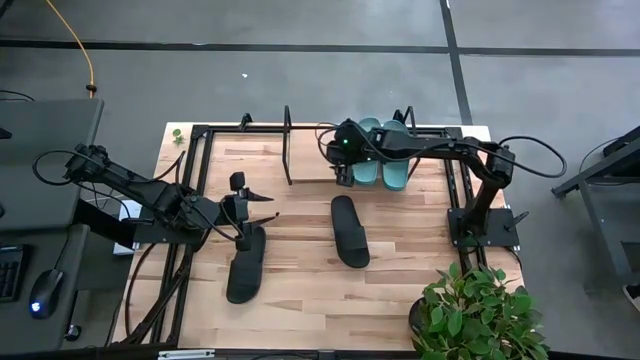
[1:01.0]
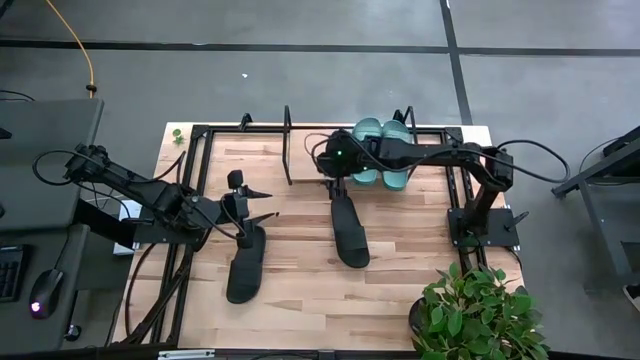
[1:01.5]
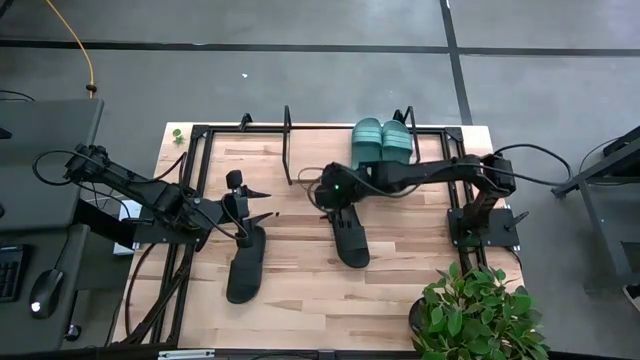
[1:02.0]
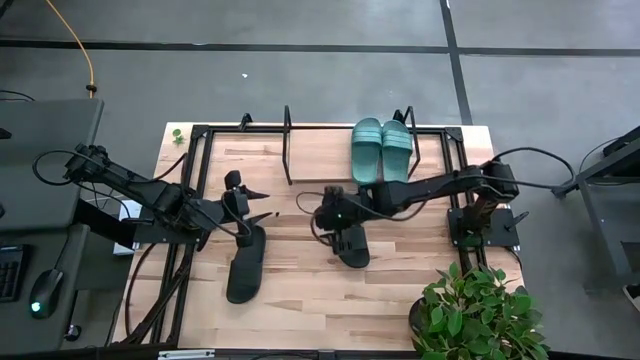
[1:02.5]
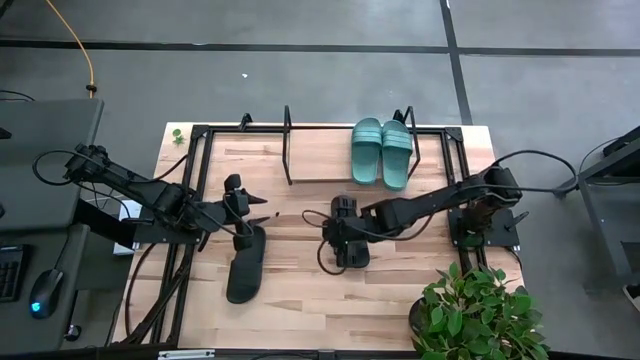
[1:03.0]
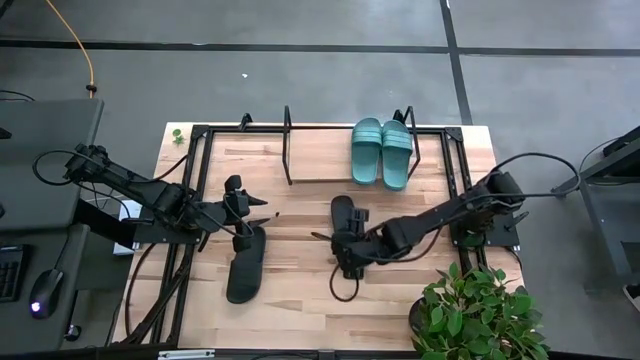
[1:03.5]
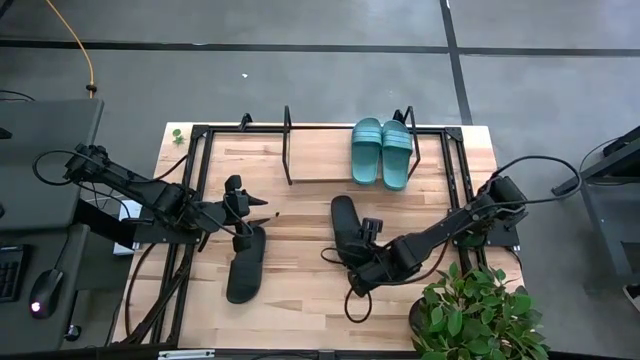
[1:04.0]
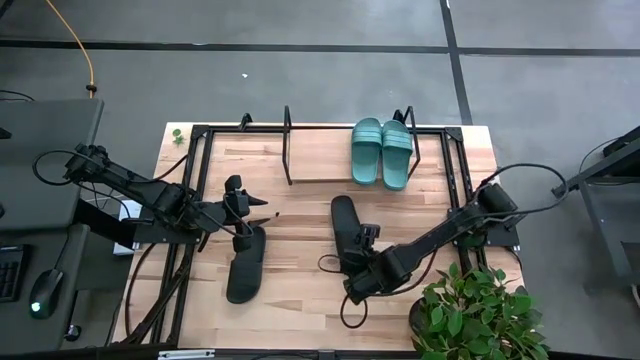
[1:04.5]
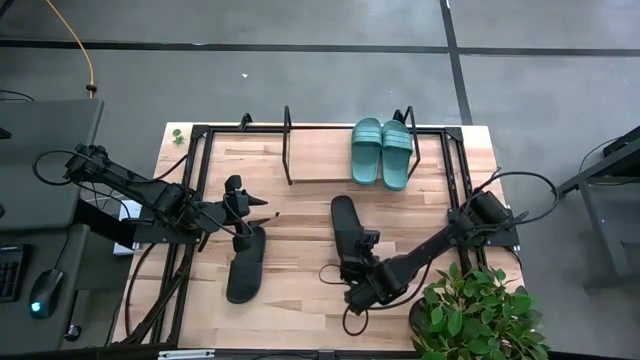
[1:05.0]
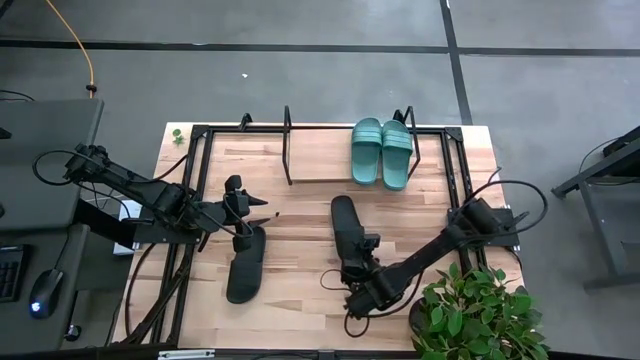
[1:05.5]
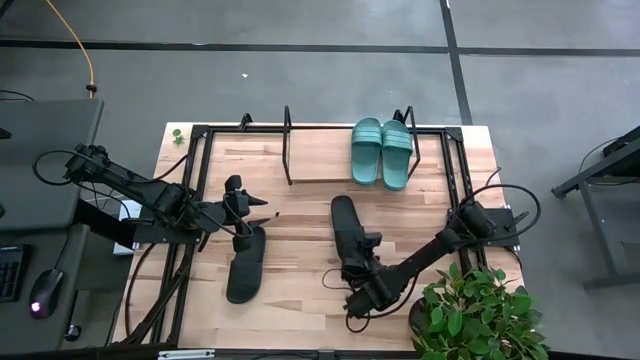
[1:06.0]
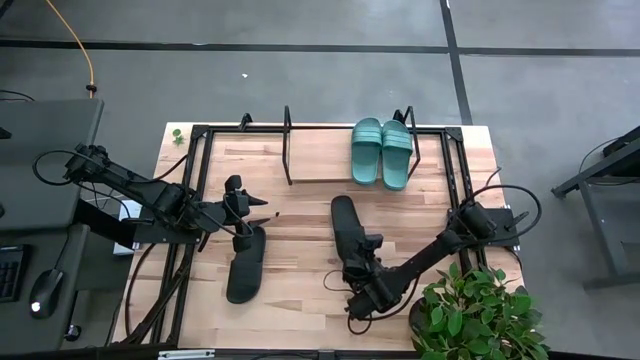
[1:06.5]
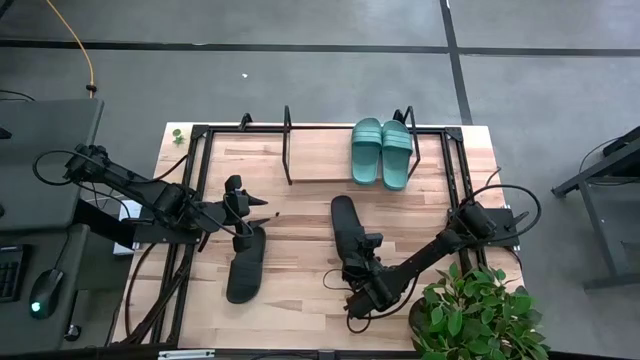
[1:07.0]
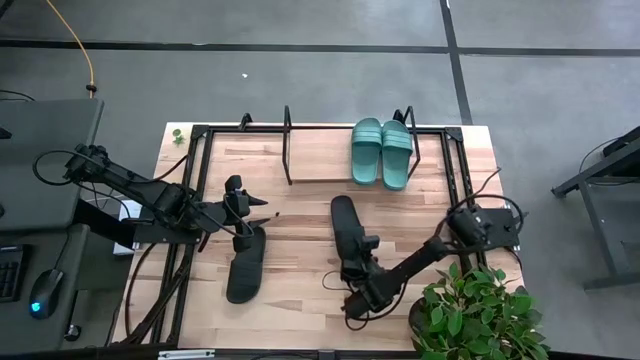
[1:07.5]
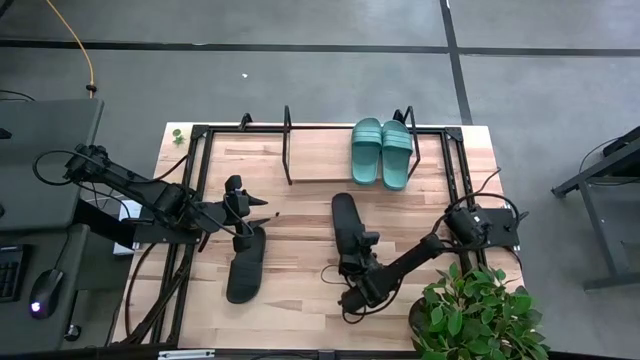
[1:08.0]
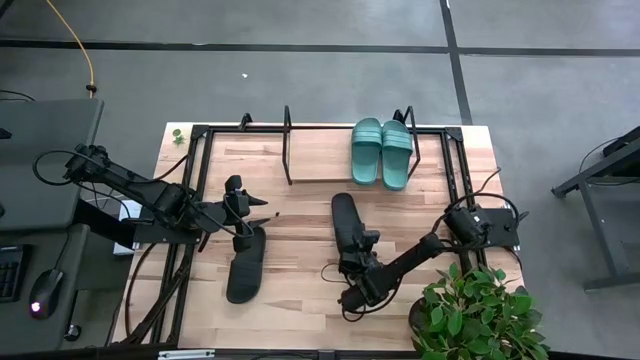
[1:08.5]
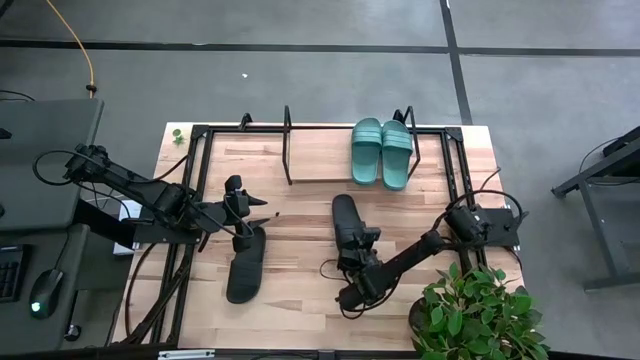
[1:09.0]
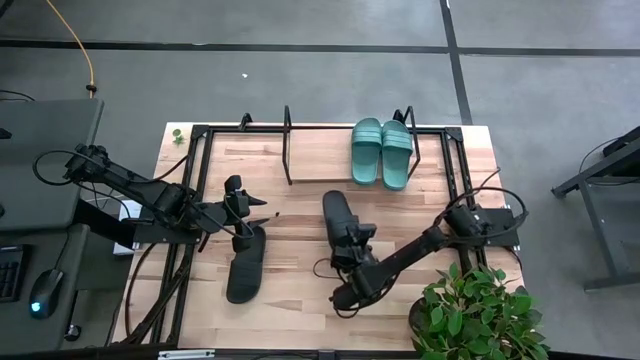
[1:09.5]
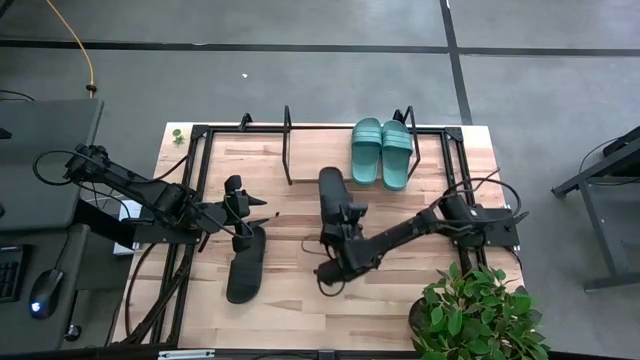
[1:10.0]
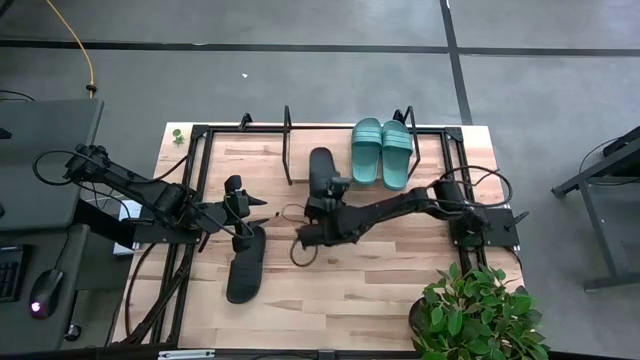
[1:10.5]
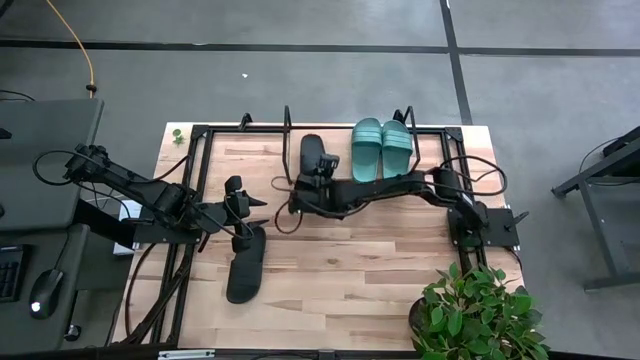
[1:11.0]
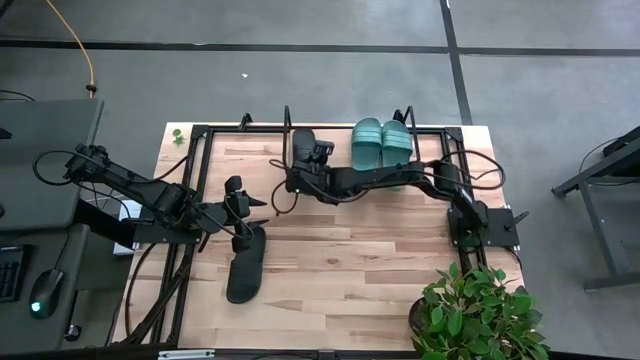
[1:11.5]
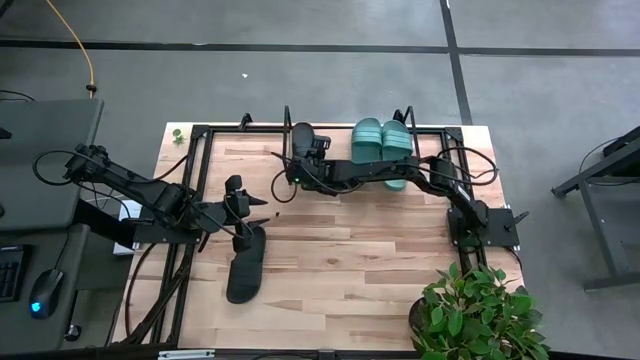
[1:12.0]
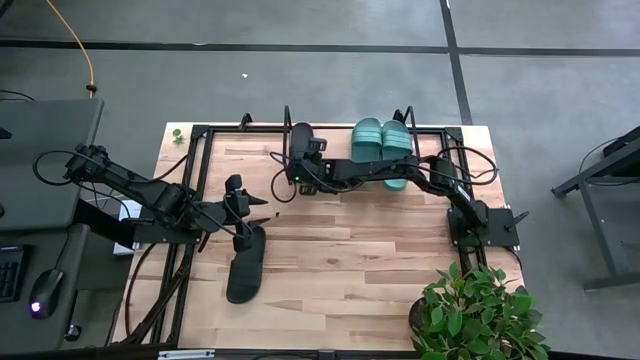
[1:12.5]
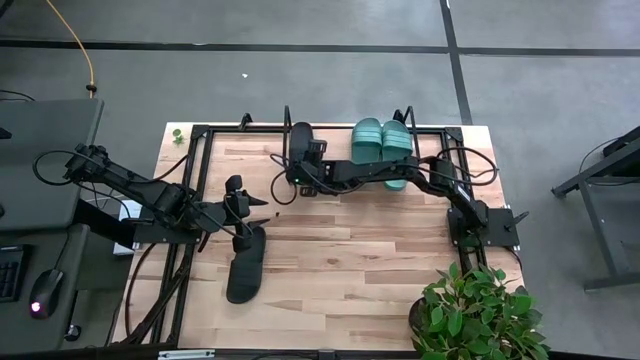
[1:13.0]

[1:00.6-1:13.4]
Task: Pick and place slides into the shelf
Put the right black slide on the shelf

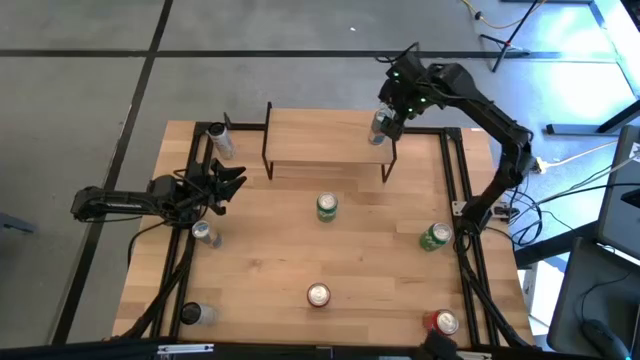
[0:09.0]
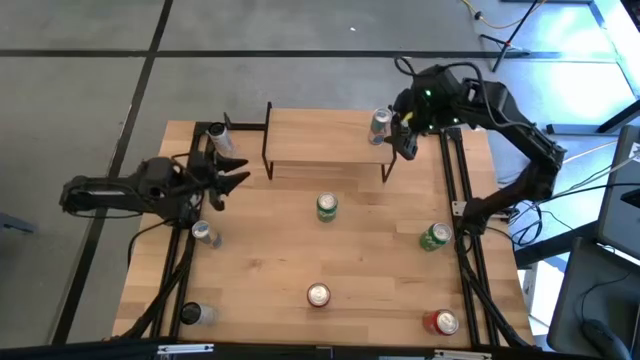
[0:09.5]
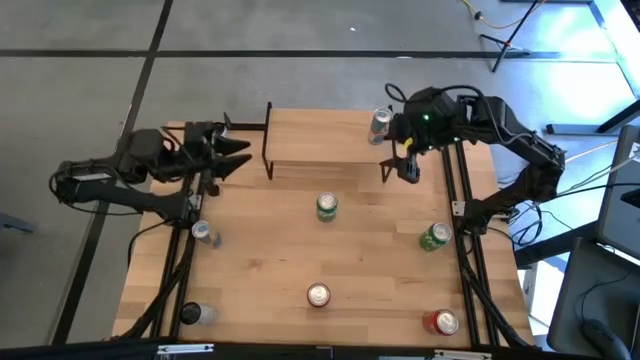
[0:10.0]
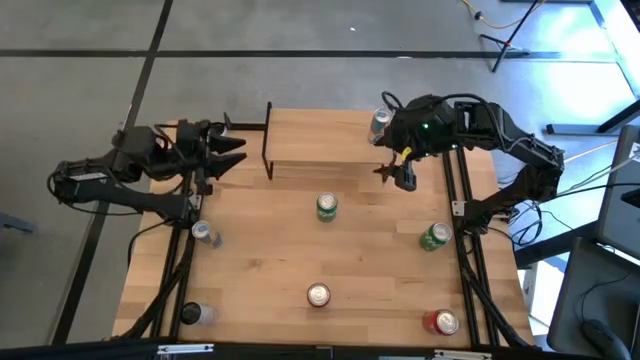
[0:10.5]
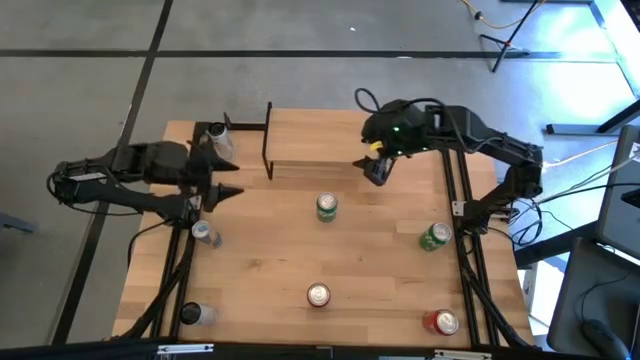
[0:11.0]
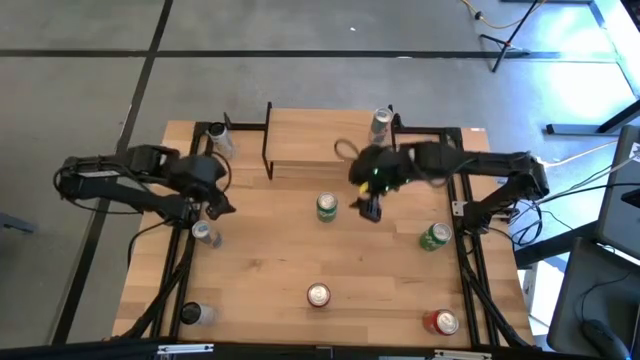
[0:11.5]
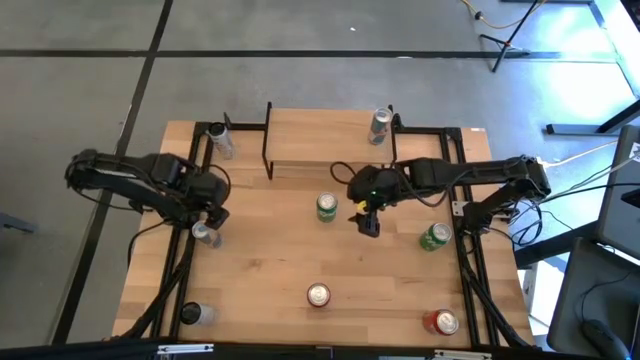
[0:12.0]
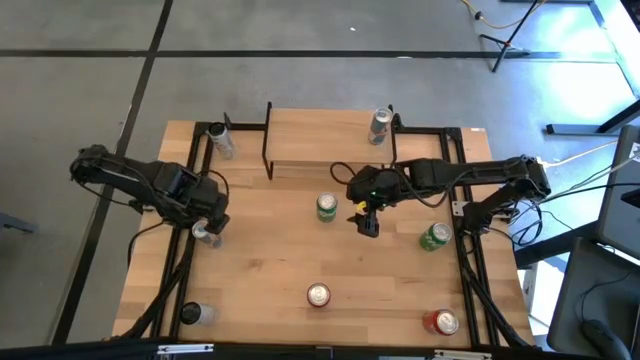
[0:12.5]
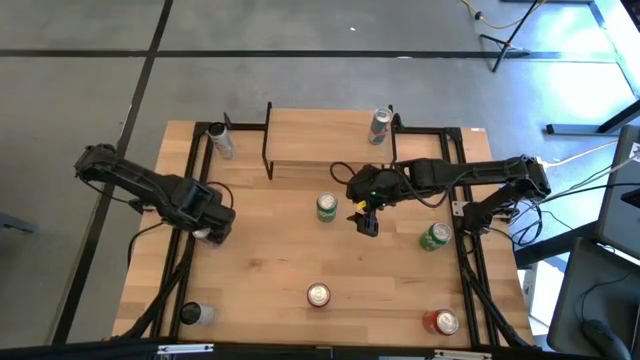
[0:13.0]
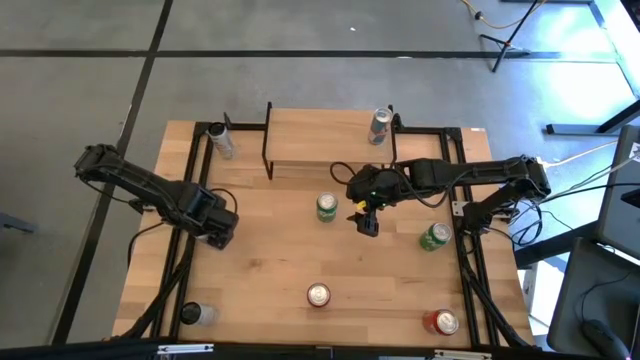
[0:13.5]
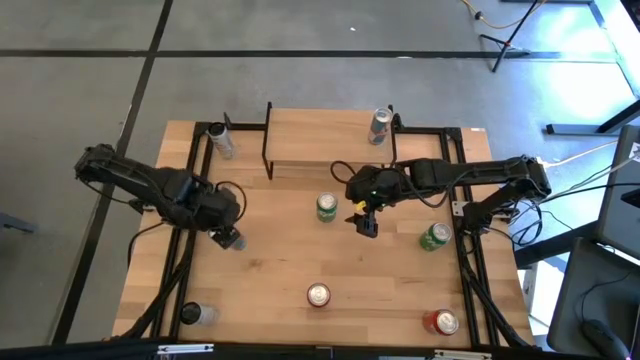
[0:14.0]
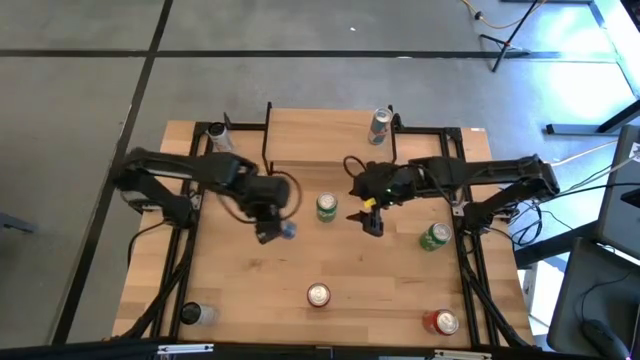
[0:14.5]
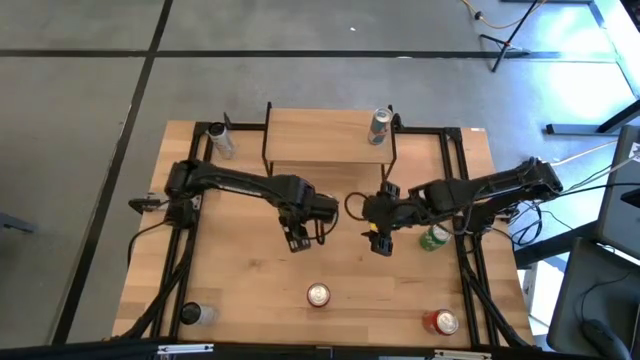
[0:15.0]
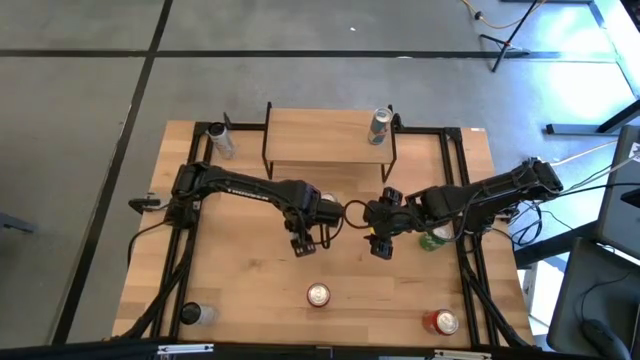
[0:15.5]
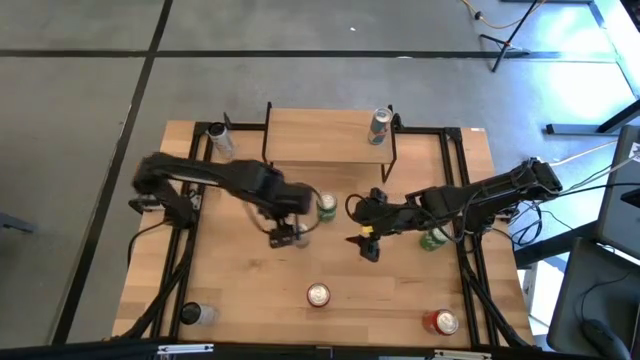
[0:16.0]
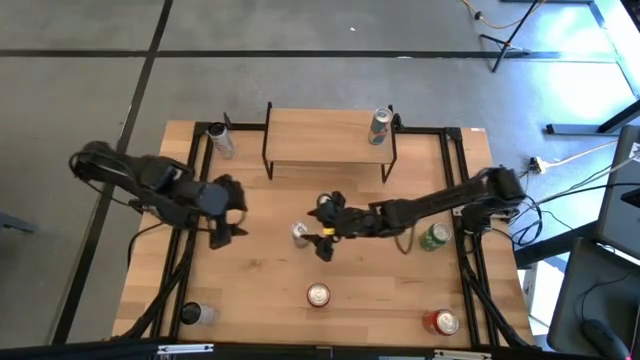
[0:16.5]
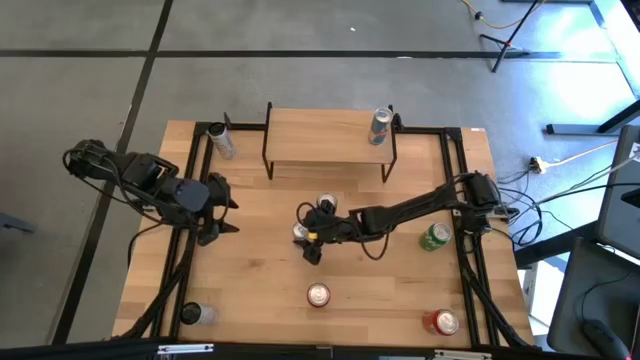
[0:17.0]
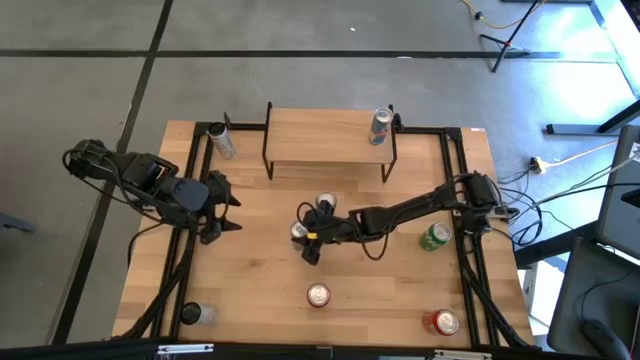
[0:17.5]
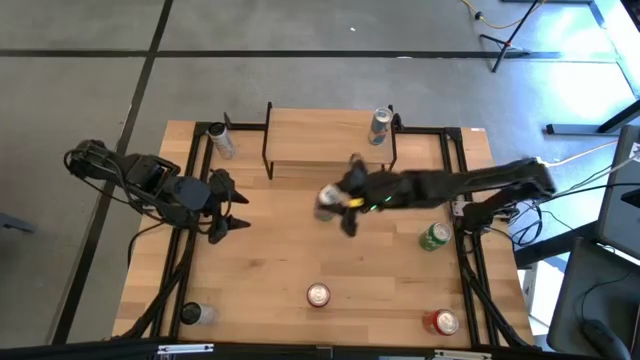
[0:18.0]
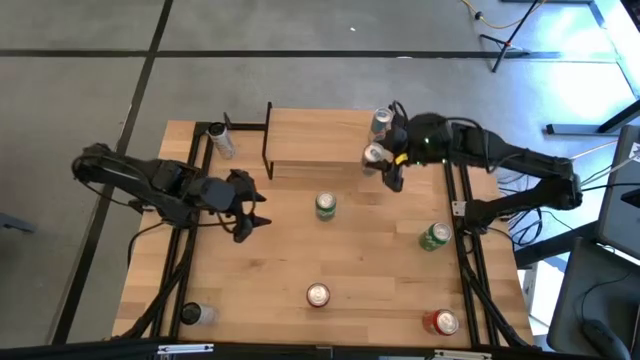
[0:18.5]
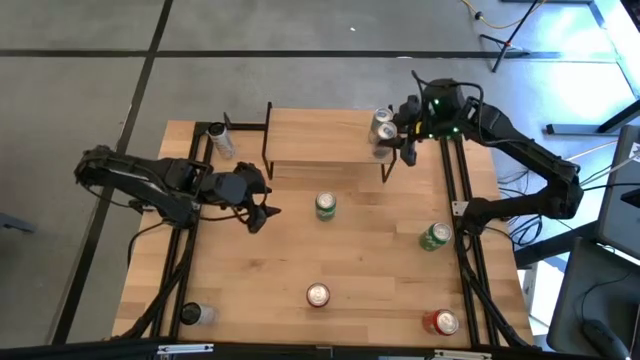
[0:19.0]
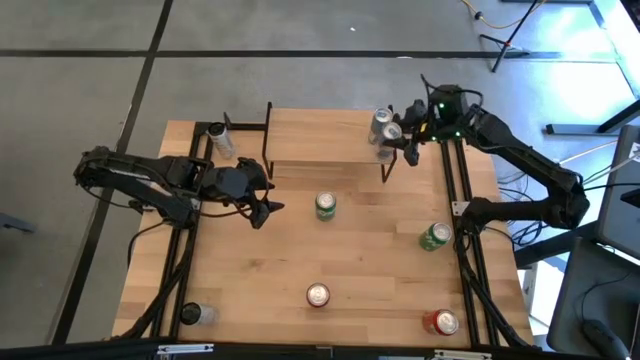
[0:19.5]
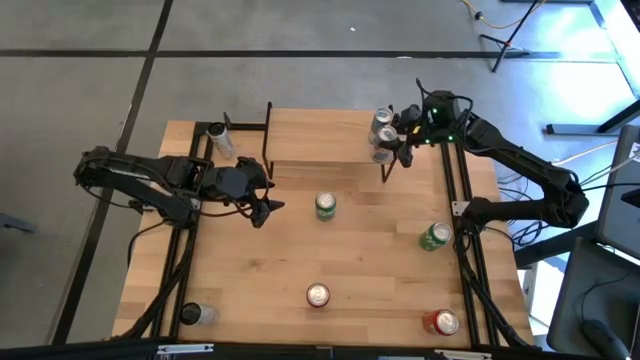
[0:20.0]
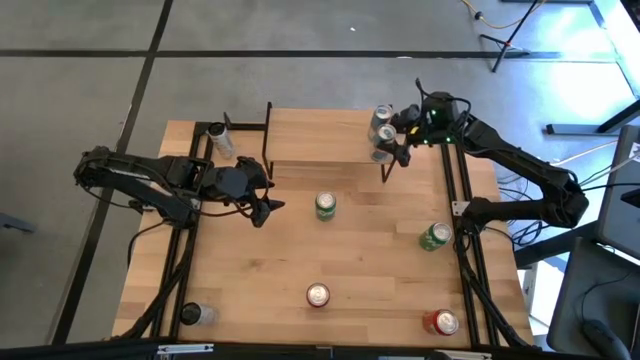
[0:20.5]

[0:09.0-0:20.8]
Task: Place canned beverage on shelf
Put the blue soda can on the shelf aligned with the other blue soda can
